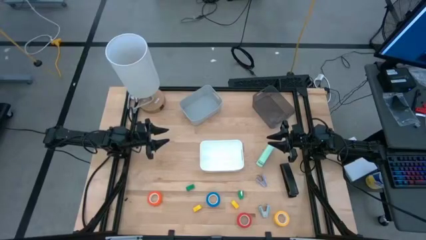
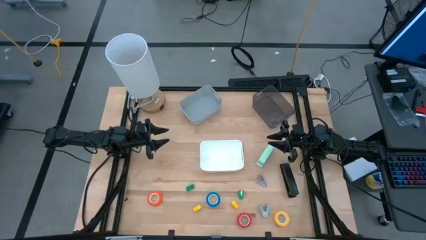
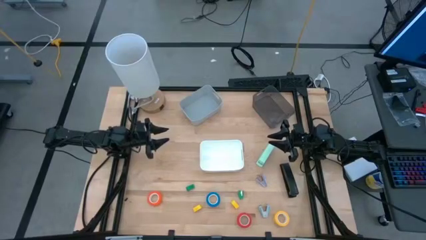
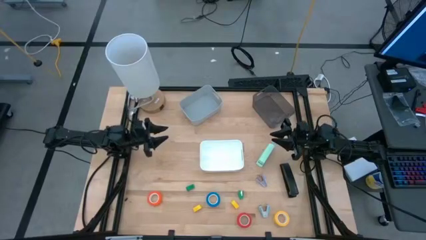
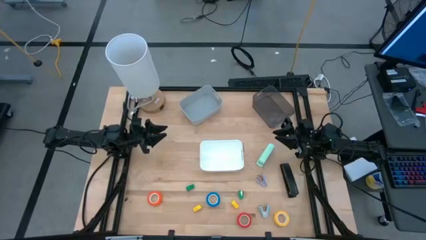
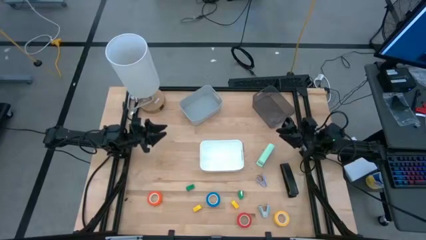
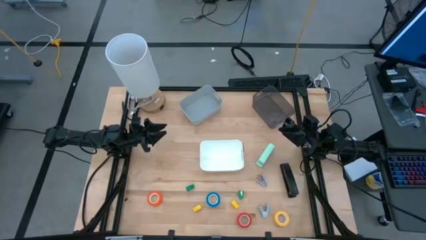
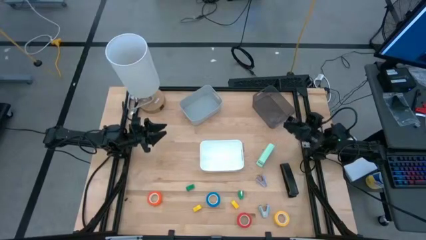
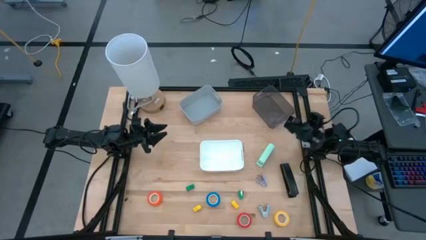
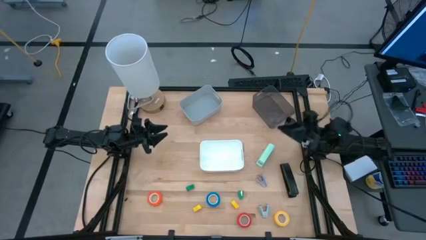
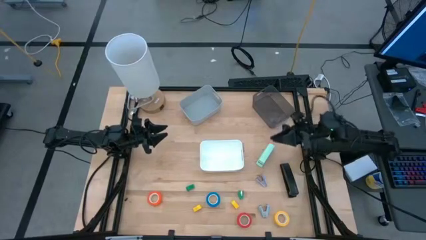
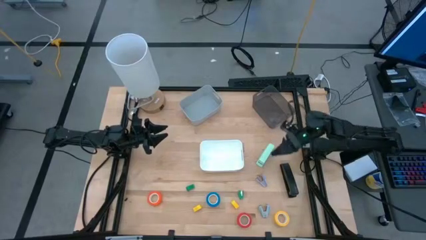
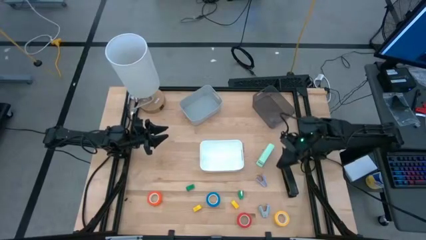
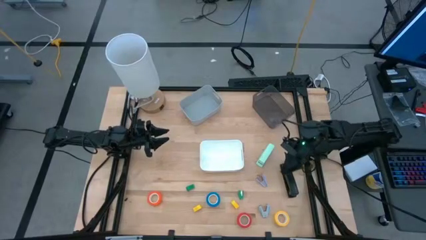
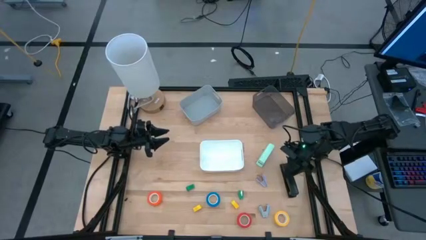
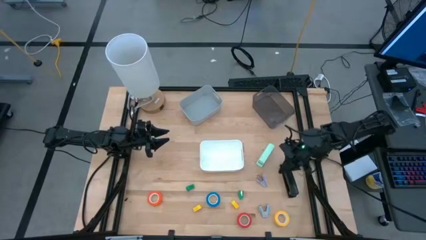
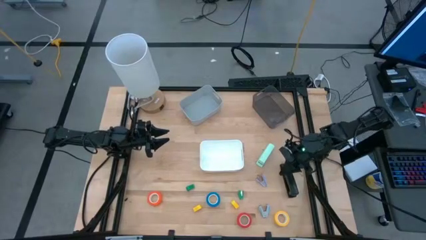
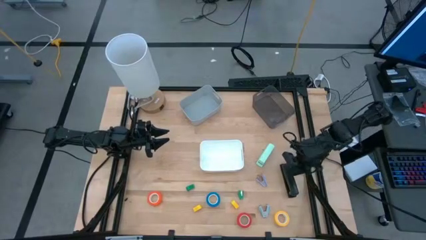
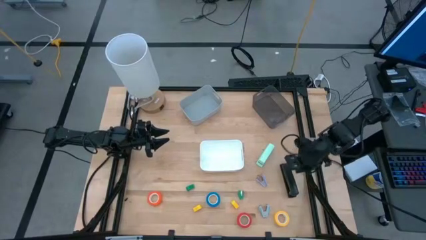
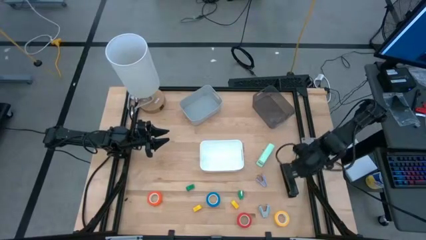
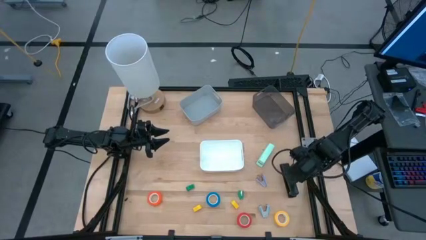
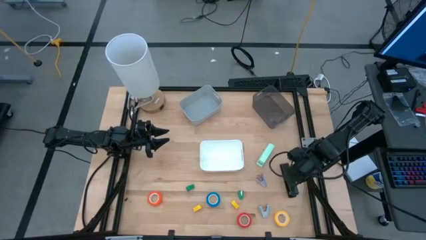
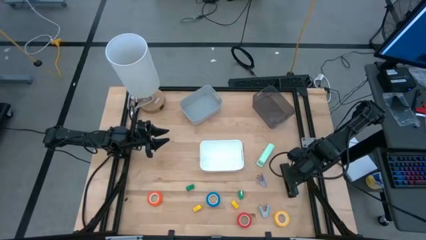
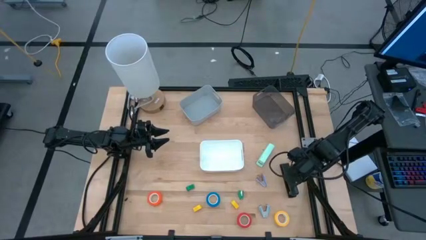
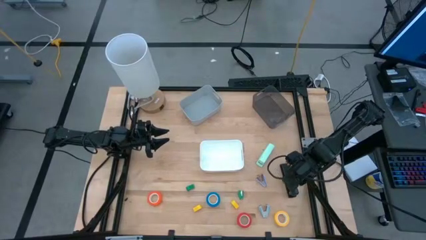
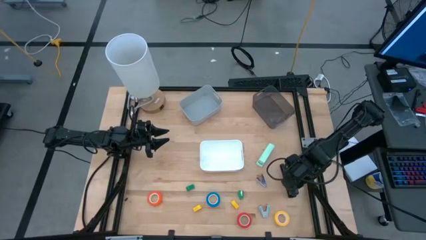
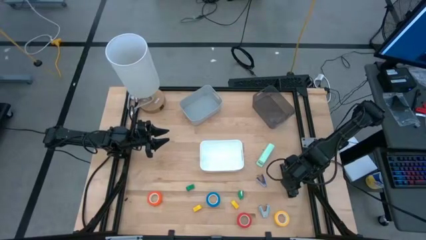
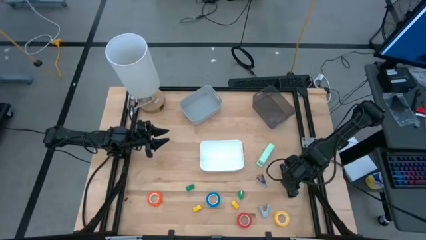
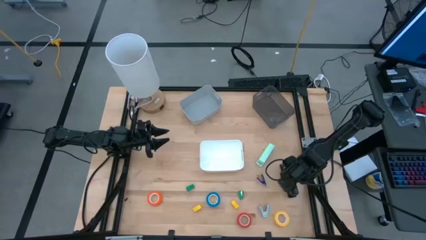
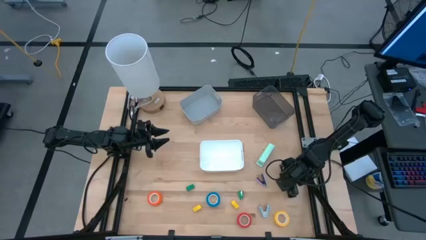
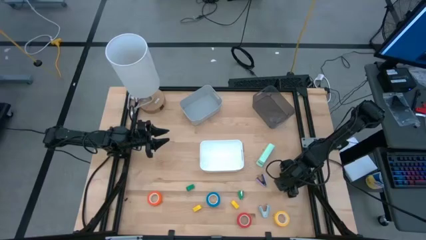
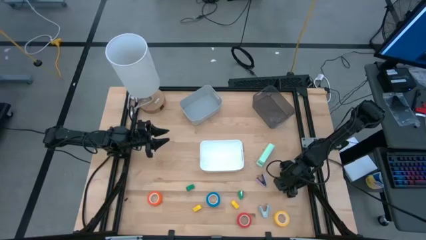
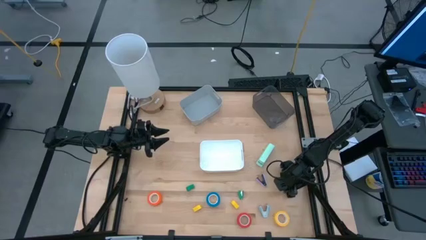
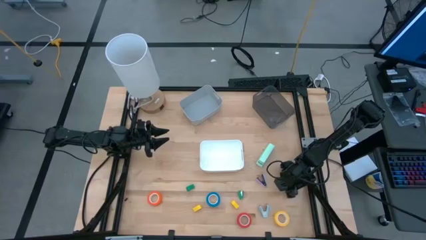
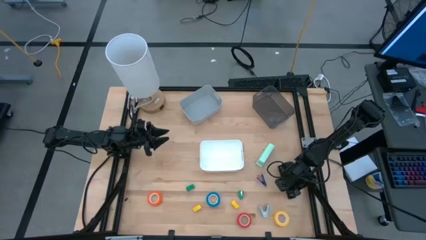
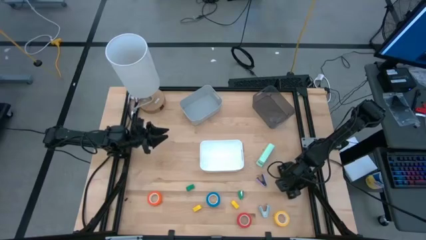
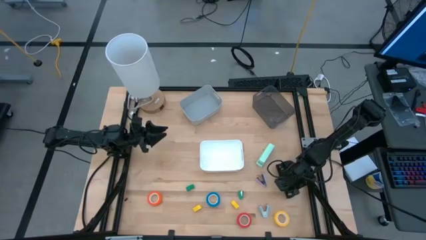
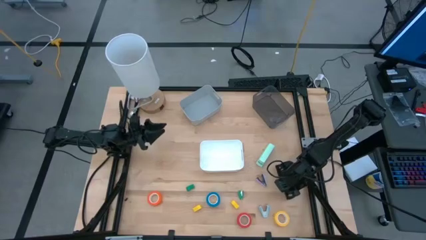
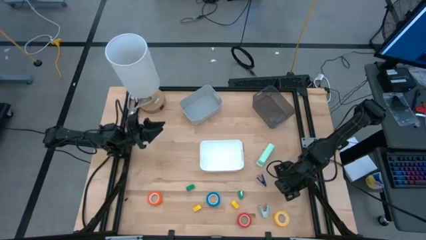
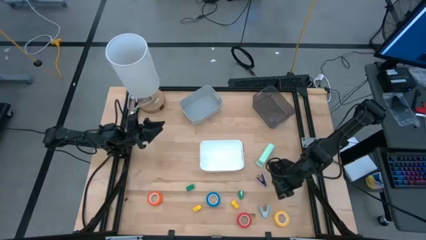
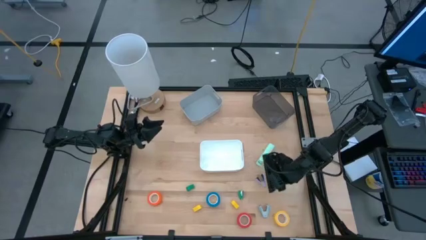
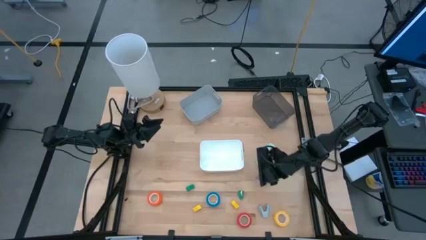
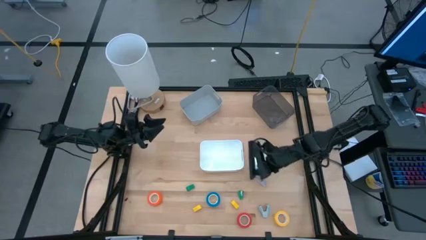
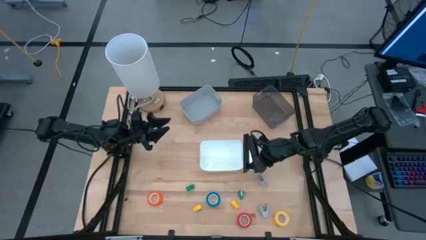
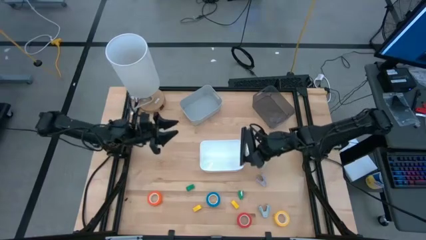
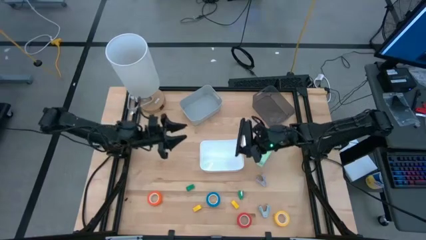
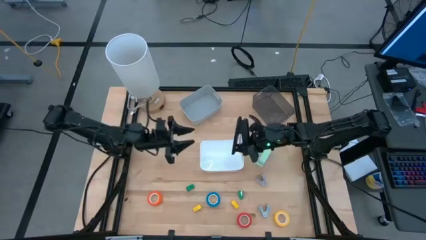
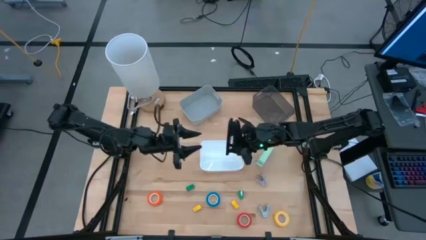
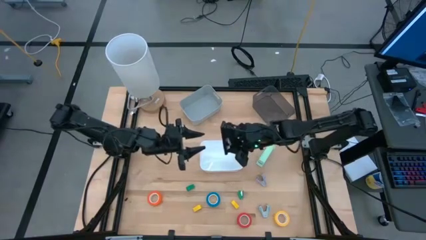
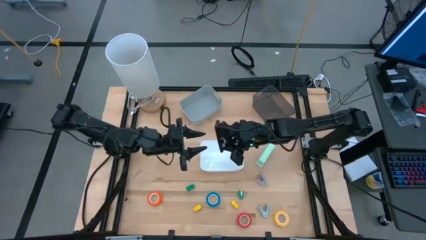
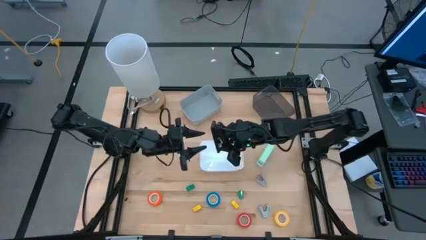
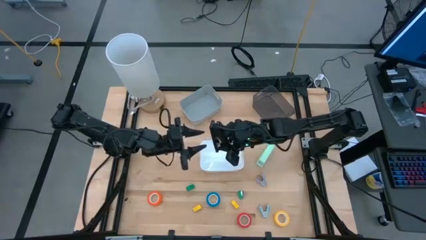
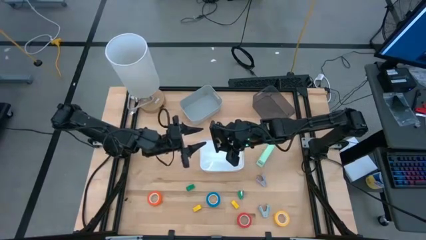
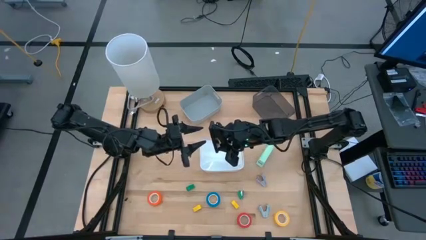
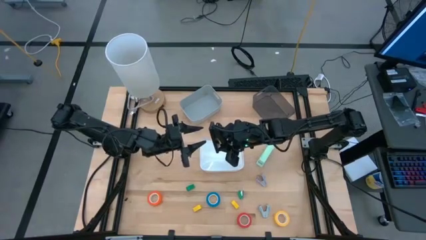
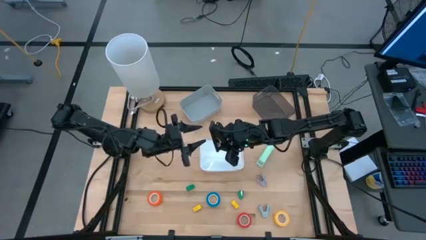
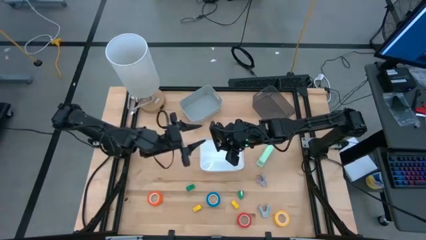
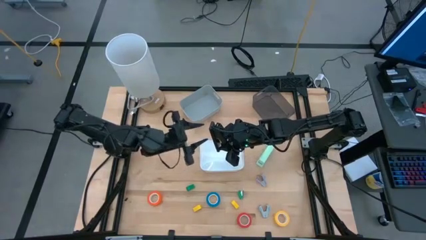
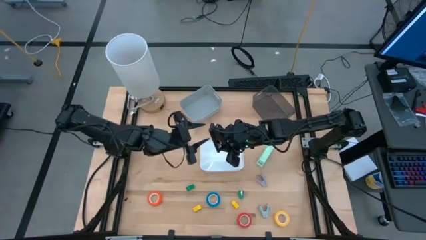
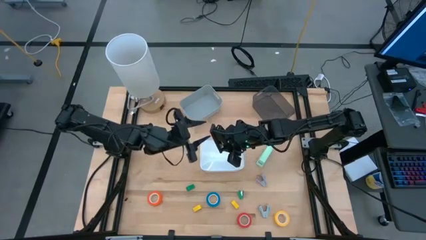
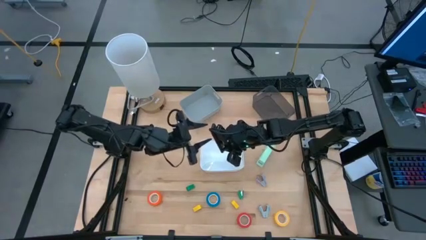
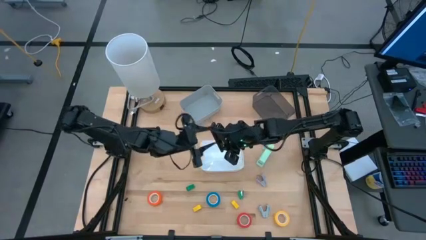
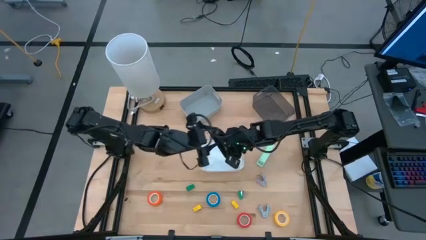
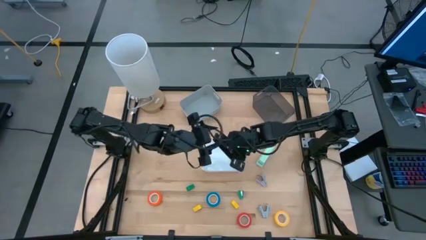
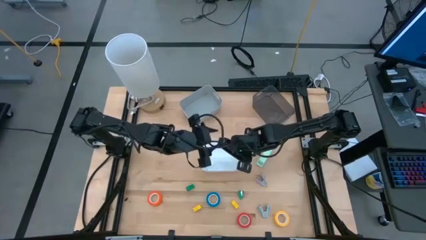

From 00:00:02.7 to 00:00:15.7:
Task: Pick and place Stapler, Stapler remover, tape
Put the black stapler into the gray bin
